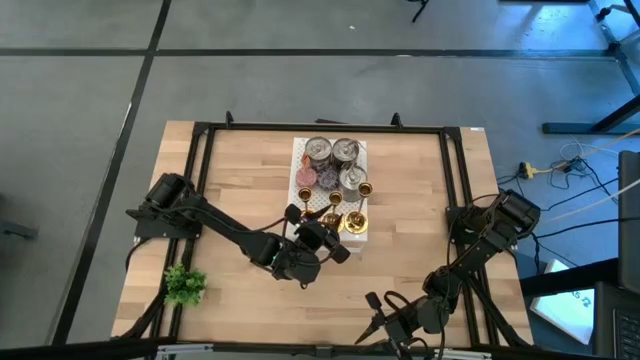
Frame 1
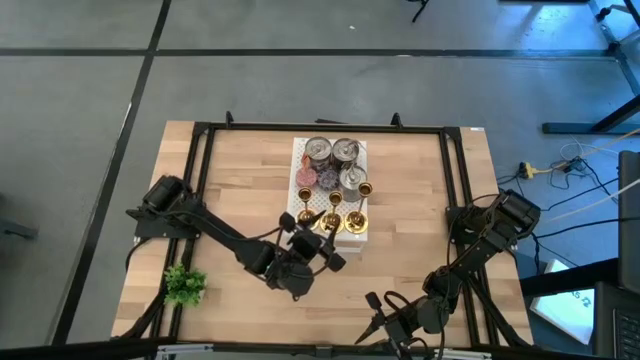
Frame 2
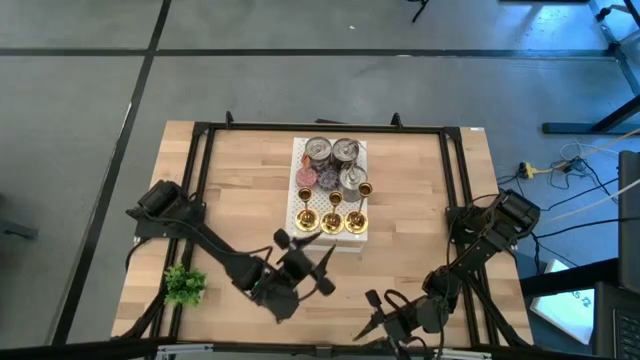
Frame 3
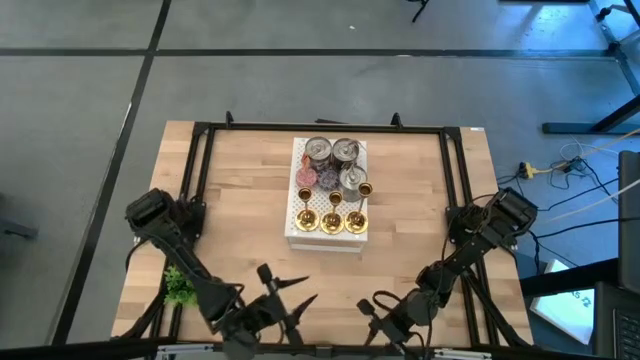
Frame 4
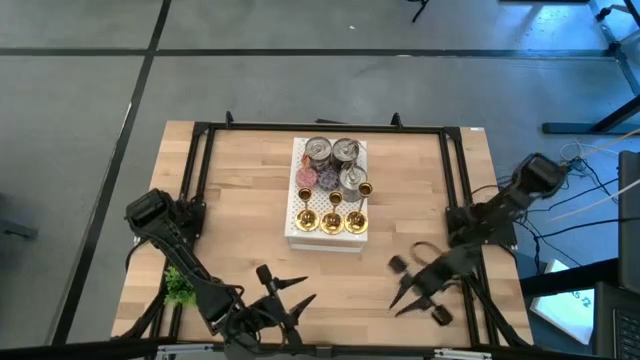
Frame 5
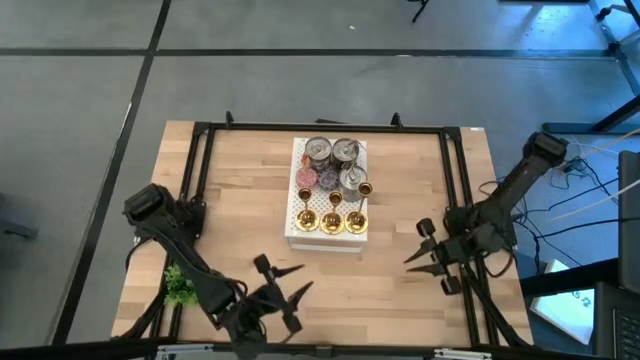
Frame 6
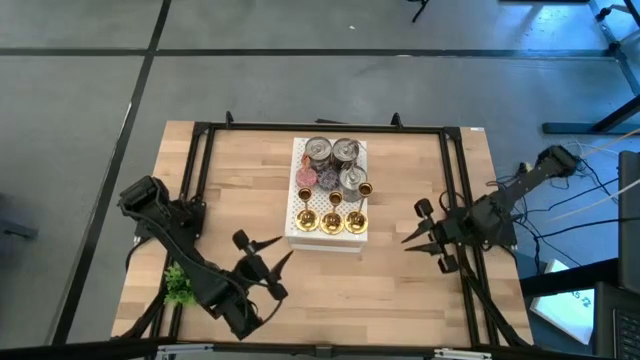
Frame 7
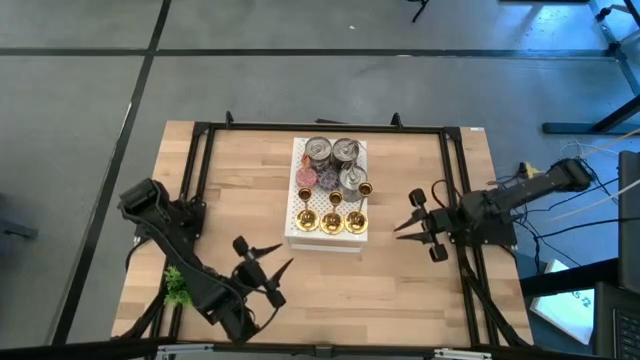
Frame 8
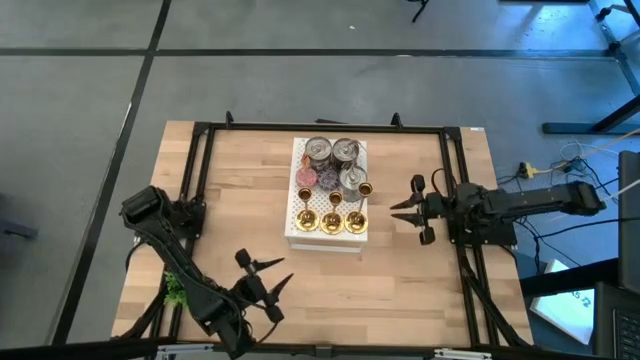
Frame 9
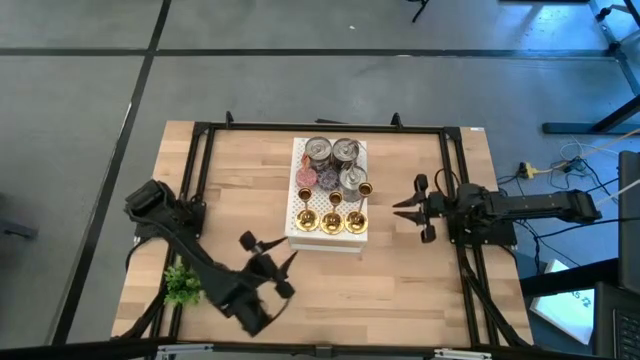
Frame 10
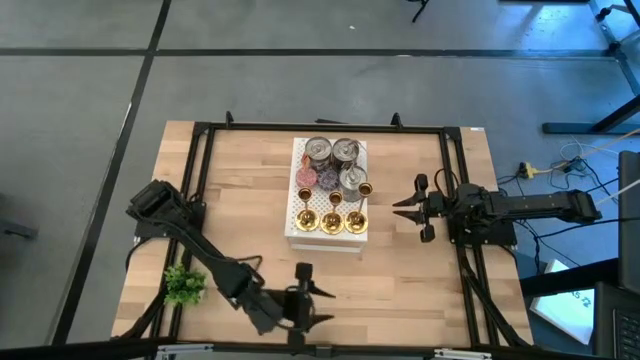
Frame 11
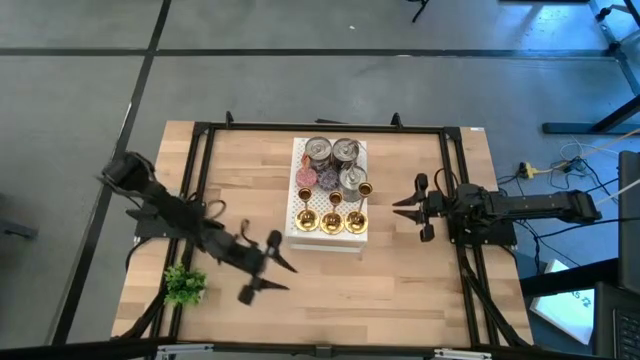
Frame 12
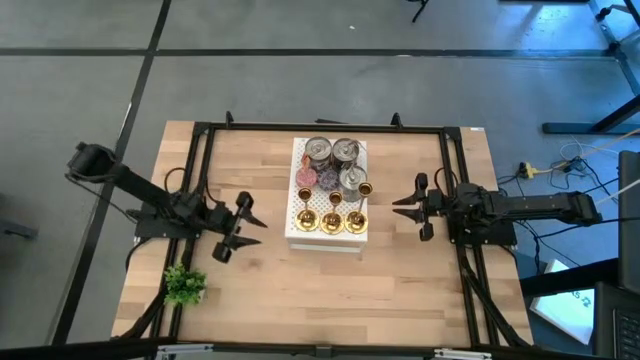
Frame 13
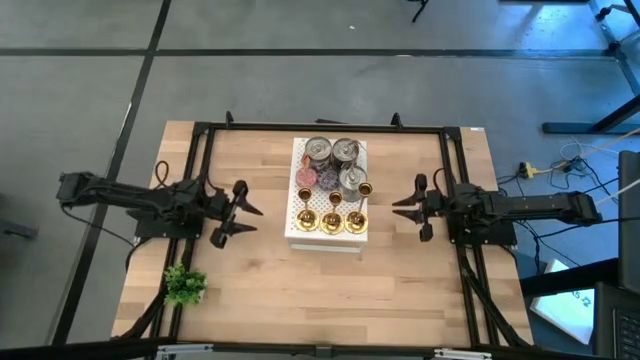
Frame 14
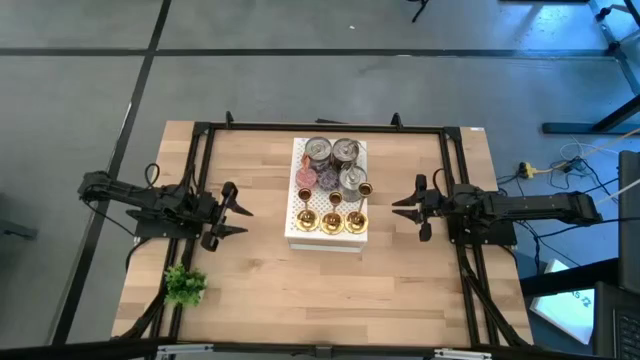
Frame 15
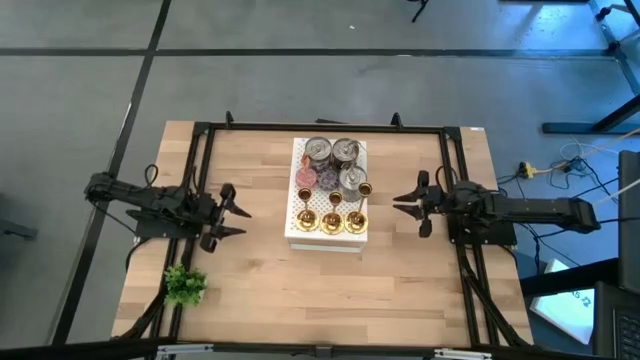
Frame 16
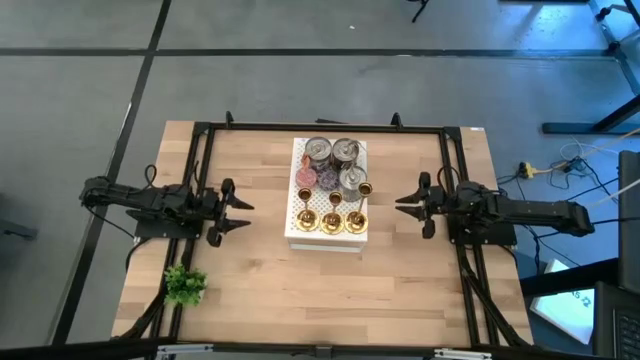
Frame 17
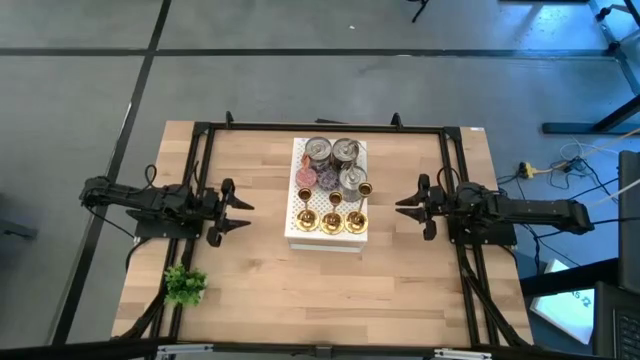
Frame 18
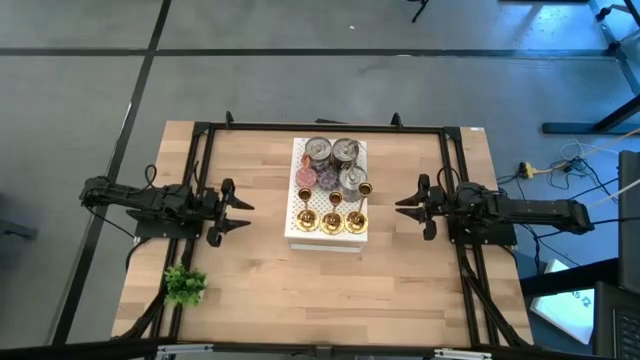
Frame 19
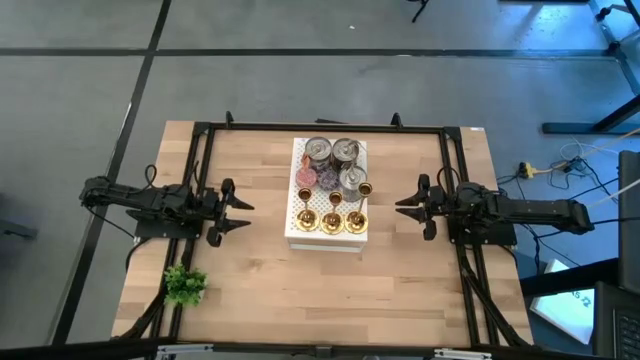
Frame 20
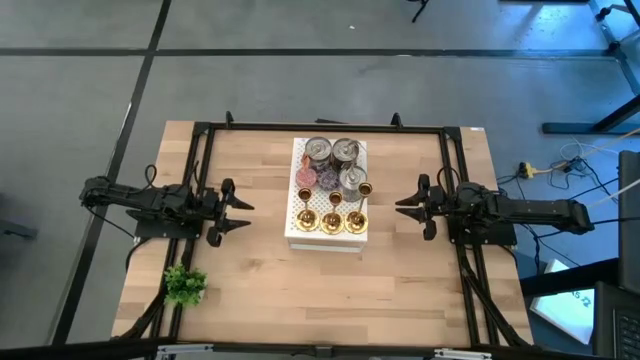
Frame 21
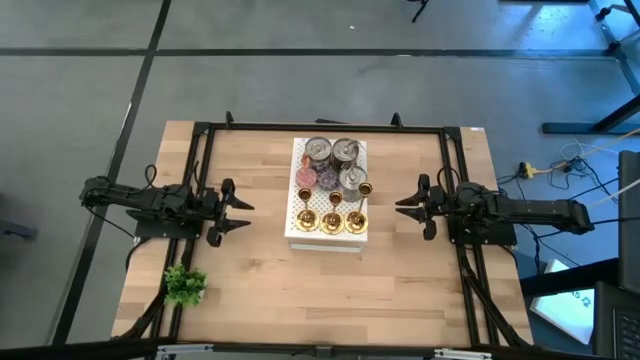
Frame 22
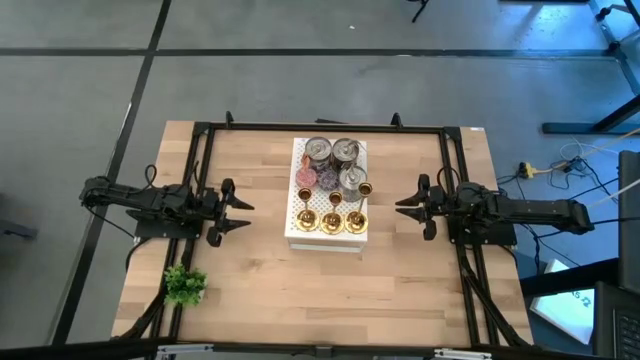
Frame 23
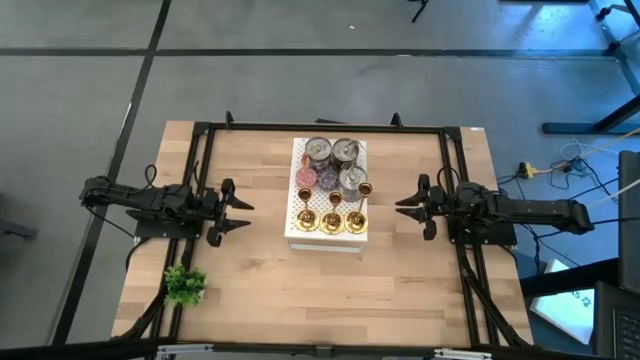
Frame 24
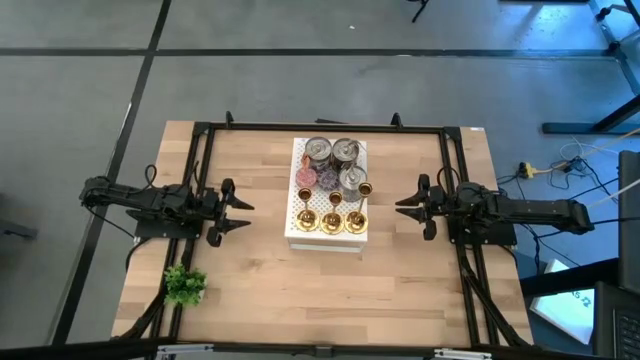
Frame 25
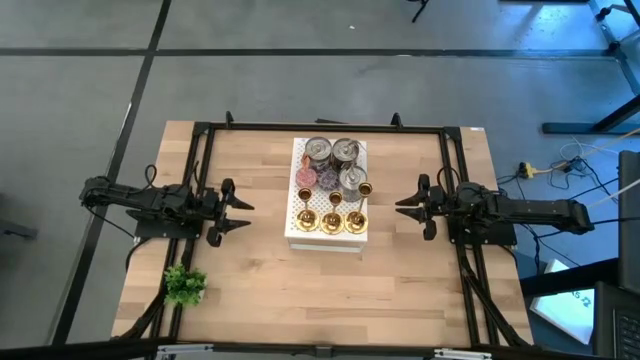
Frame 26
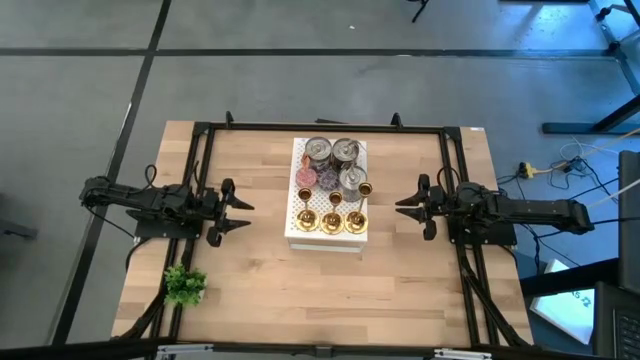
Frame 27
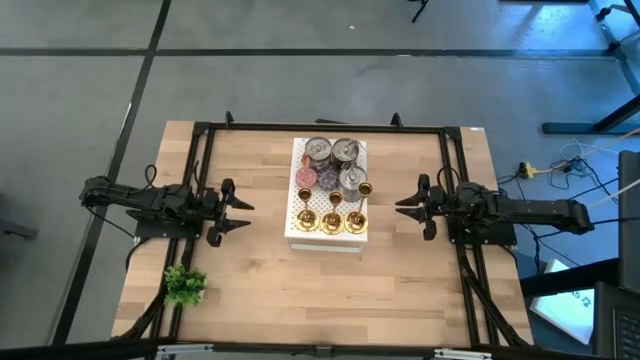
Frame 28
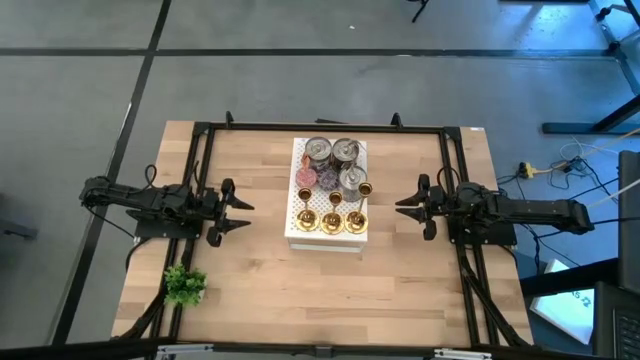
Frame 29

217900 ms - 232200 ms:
Task: Pick & Place candle stick holders
Return to Home Position

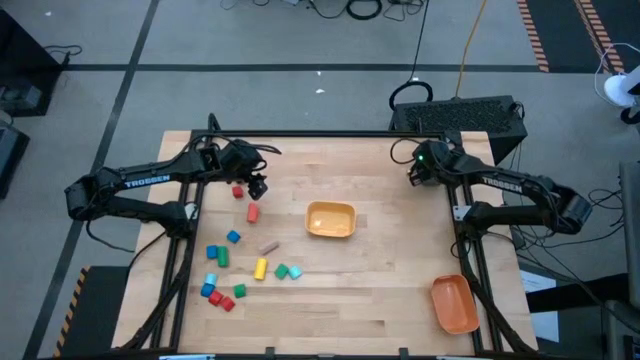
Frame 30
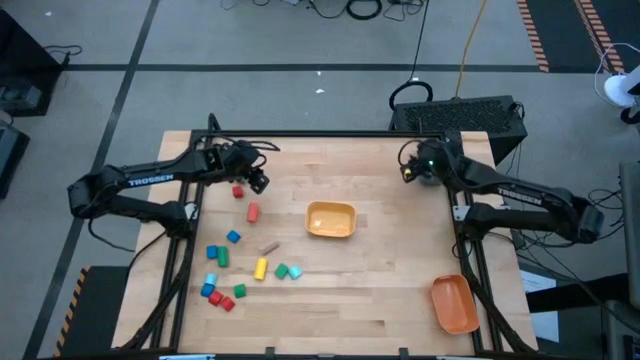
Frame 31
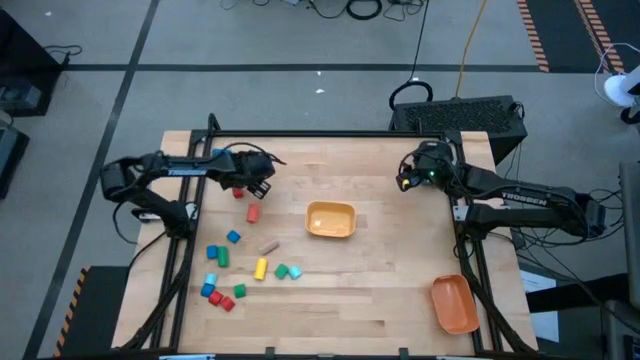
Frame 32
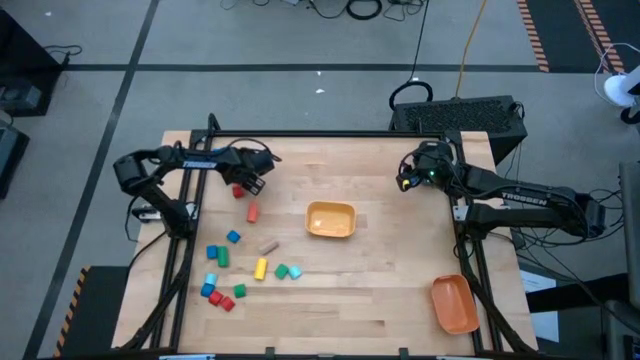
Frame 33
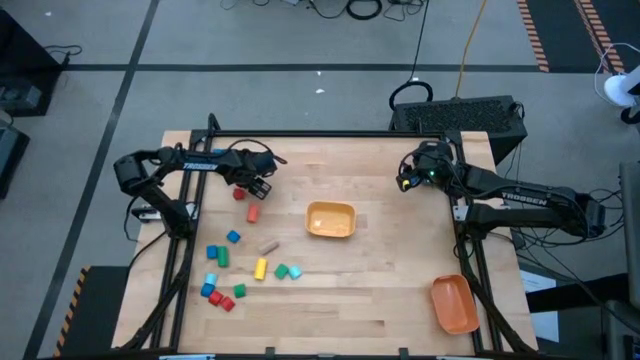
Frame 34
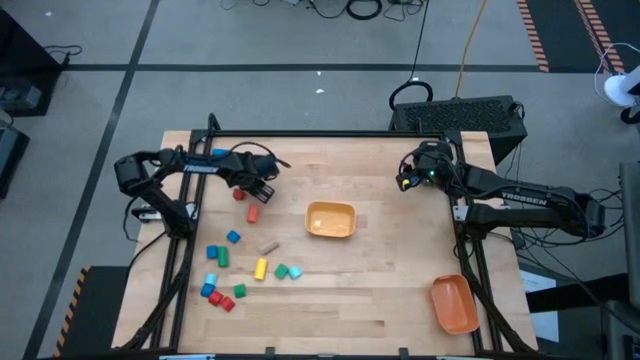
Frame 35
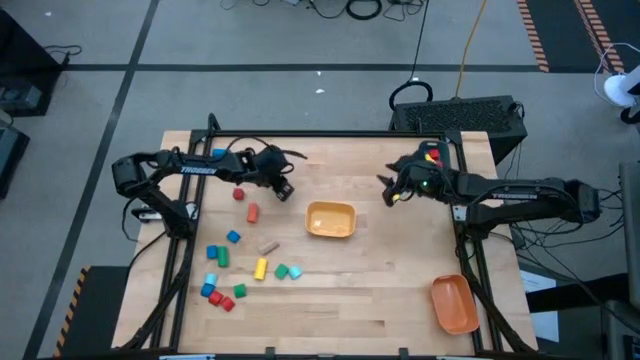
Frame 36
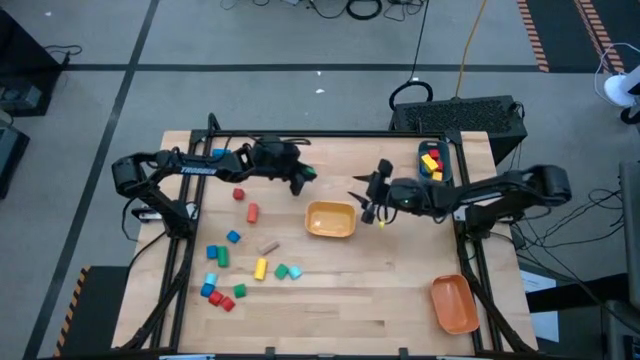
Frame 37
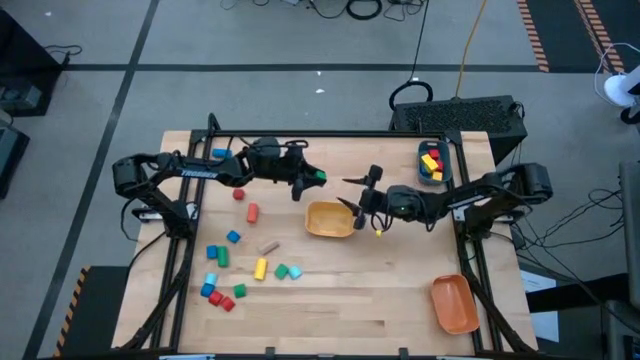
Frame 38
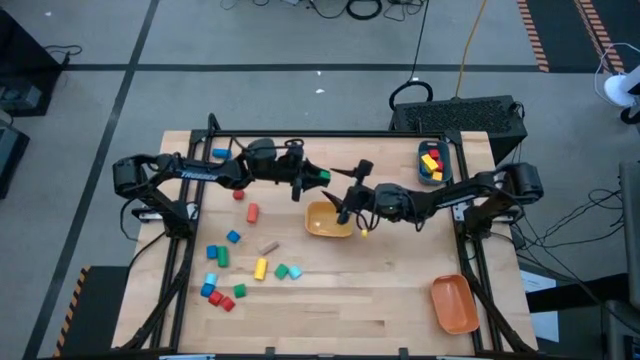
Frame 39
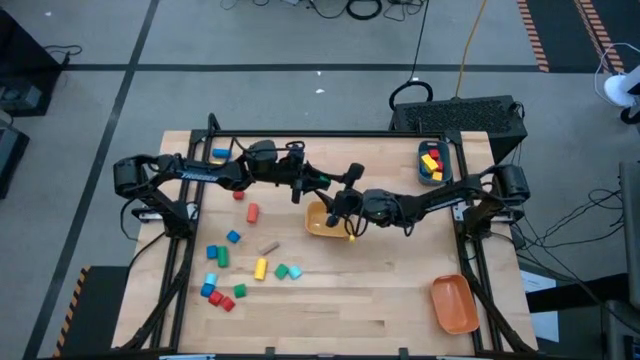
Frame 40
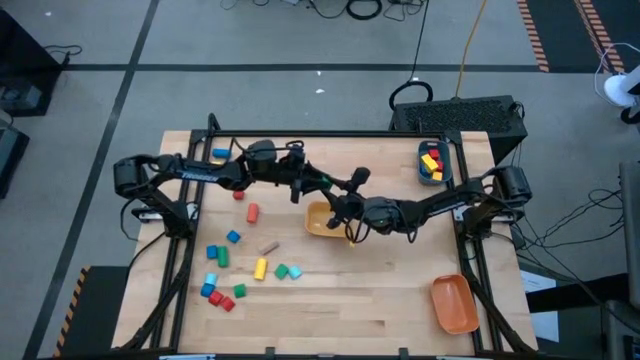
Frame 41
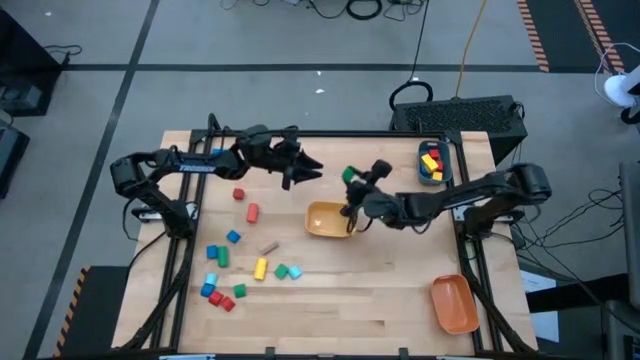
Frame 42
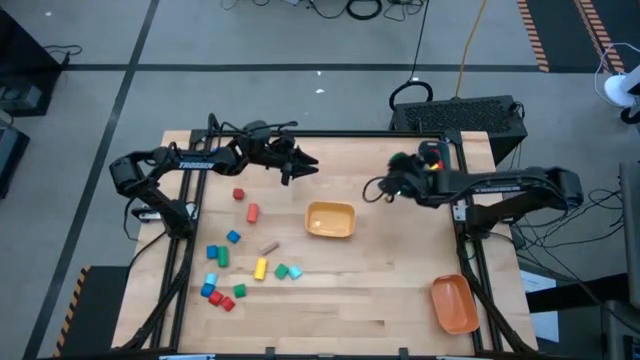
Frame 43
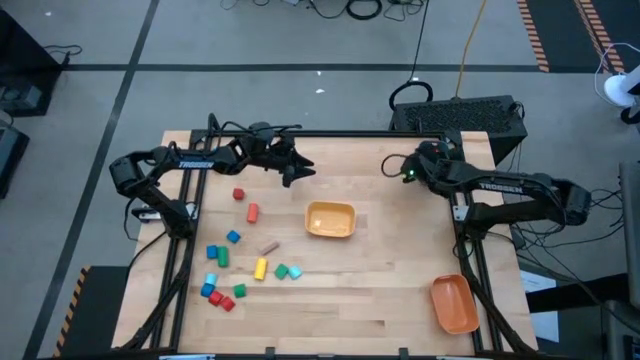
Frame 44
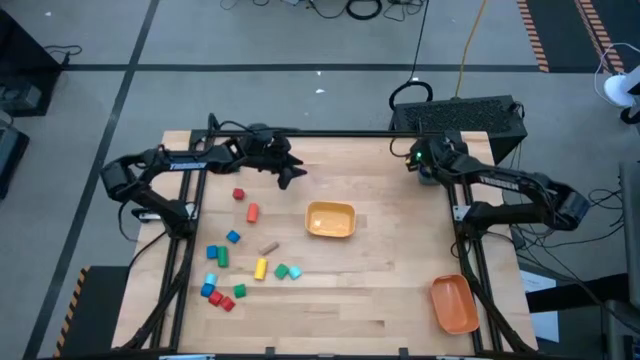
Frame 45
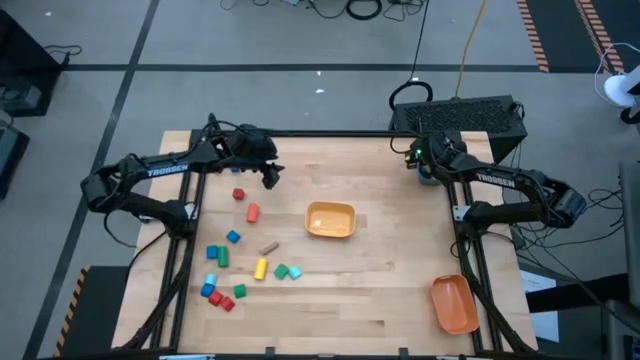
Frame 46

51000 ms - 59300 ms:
Task: Sort blocks by size
Put the green square block into the blue bin
